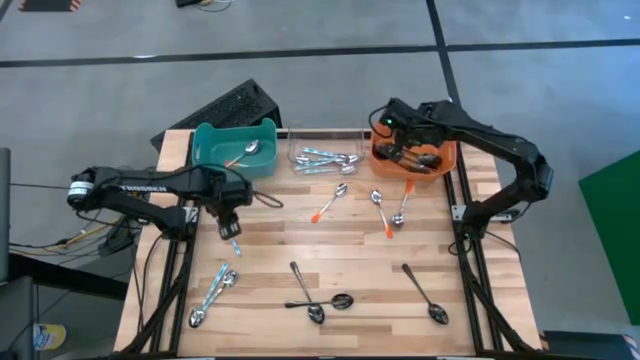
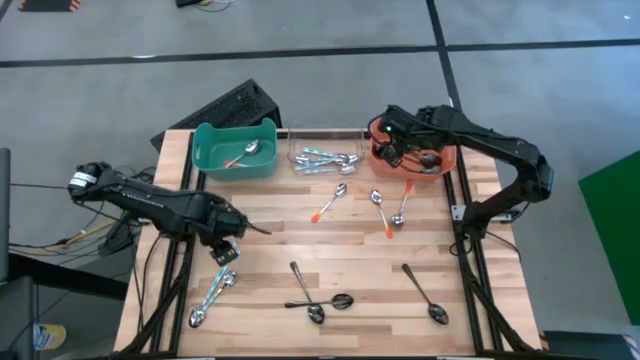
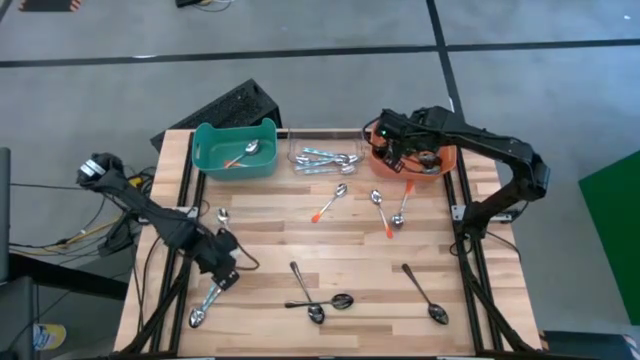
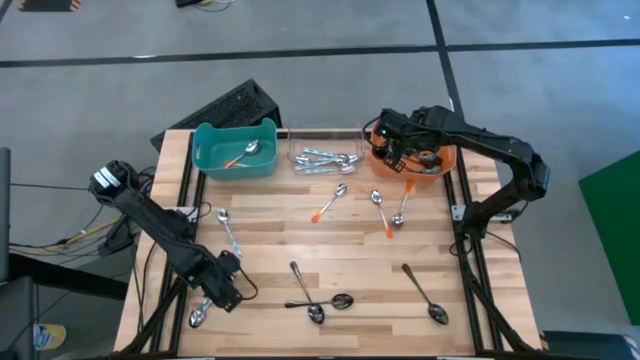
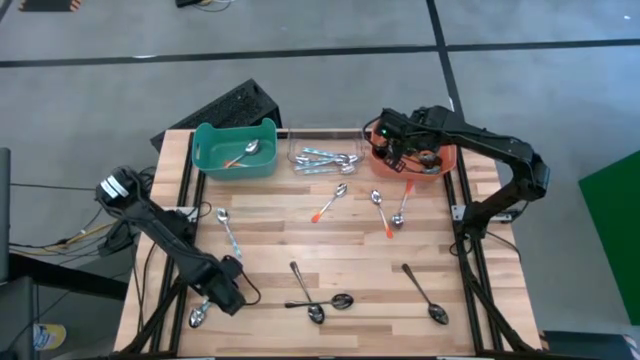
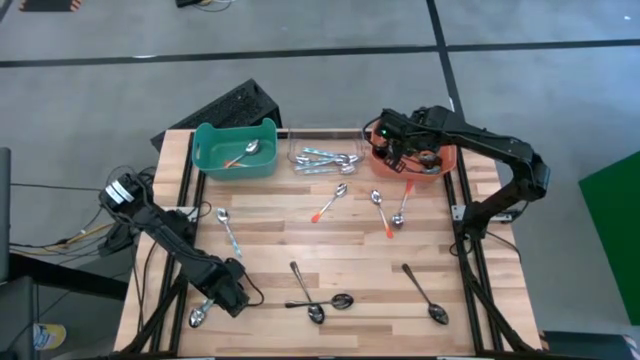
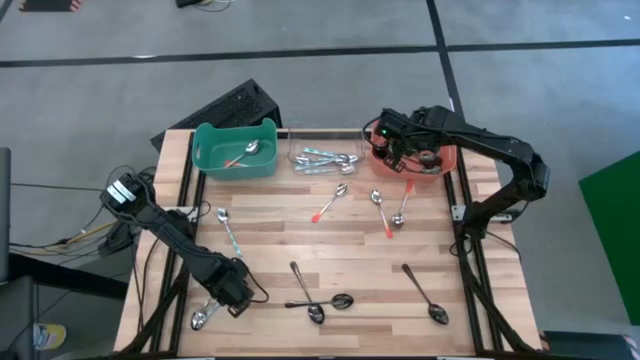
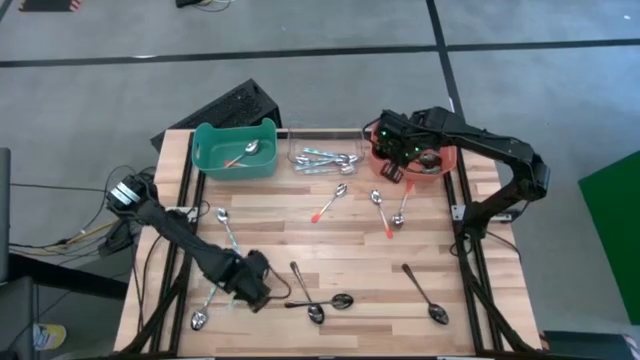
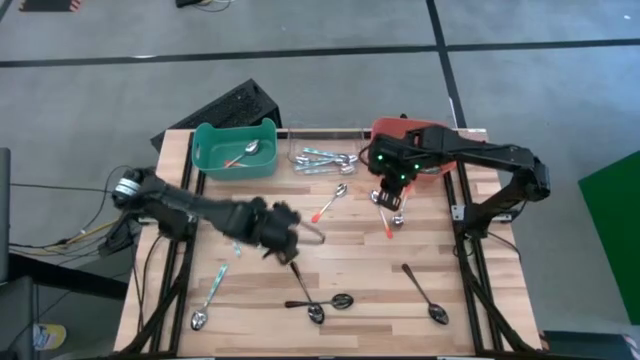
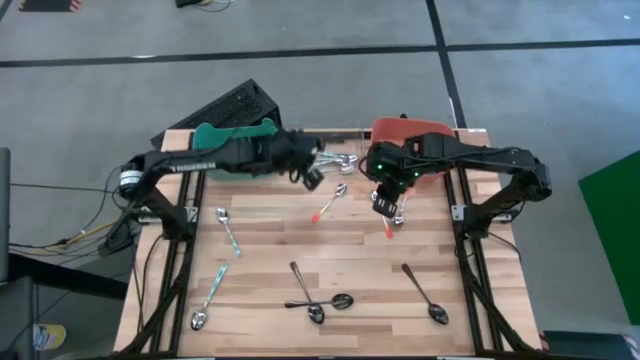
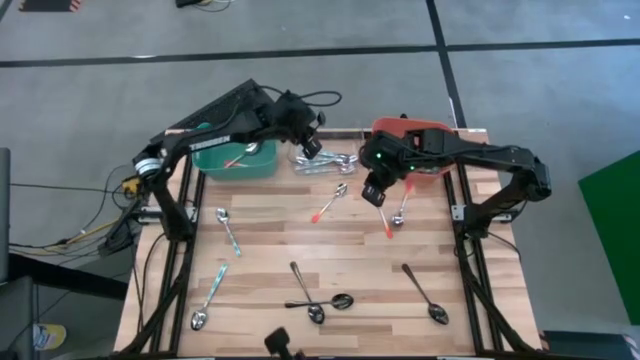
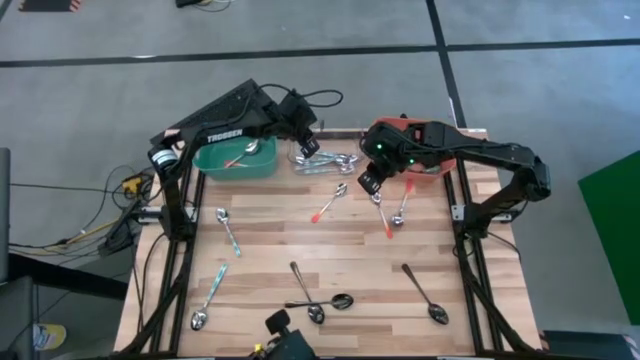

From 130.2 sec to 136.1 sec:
Task: Sort silverware by color (type)
Put the blue spoon into the transparent bin

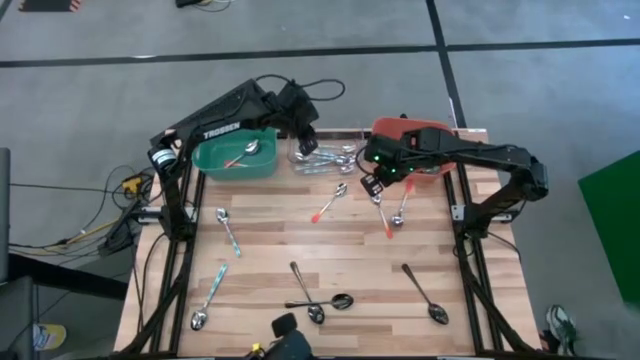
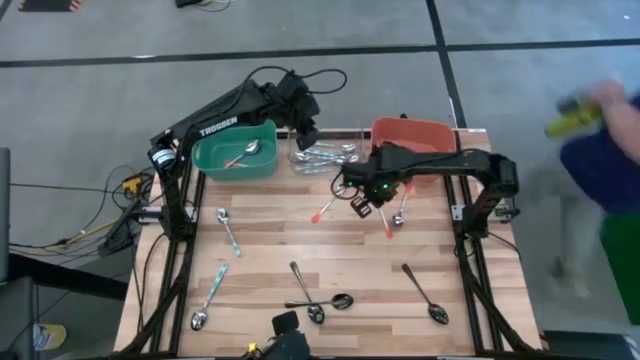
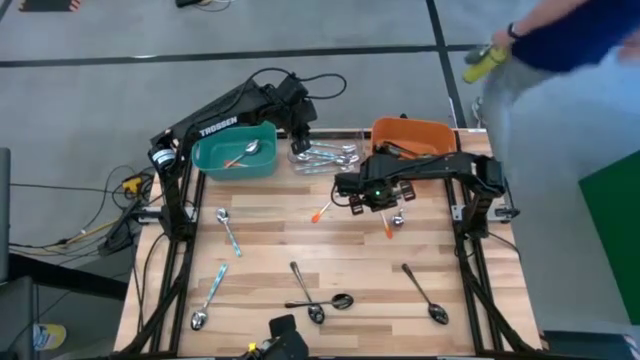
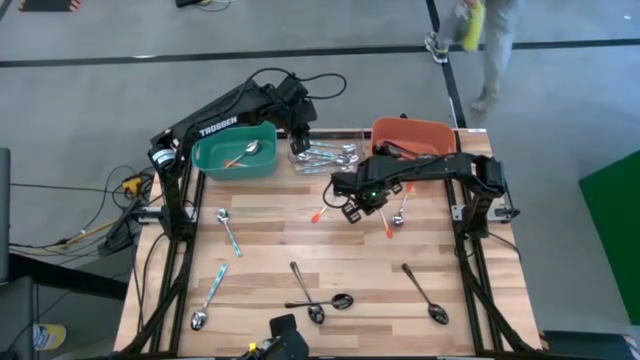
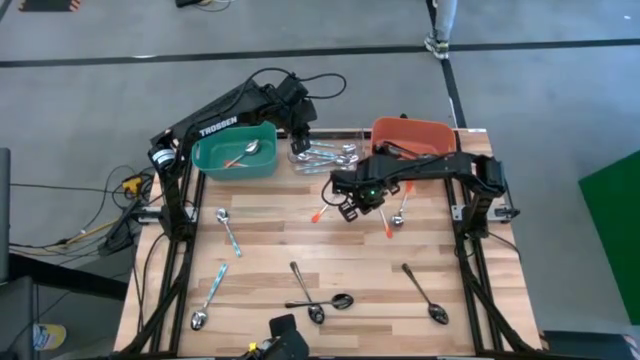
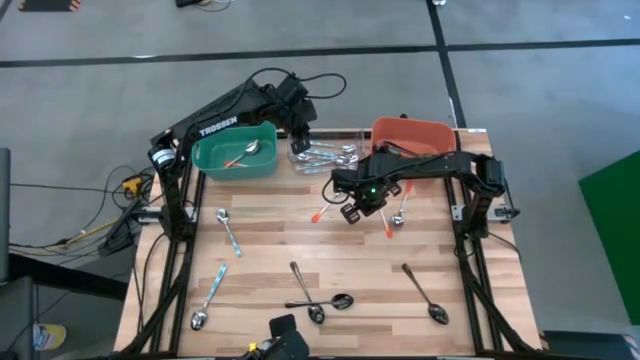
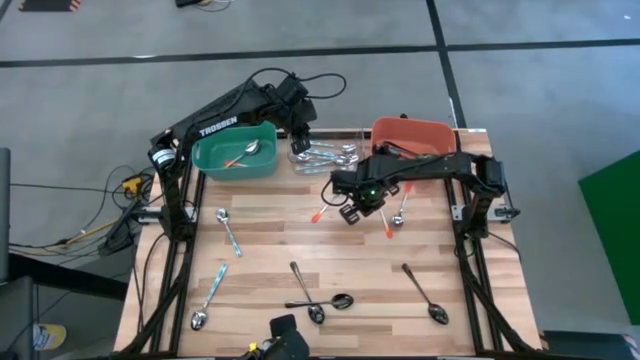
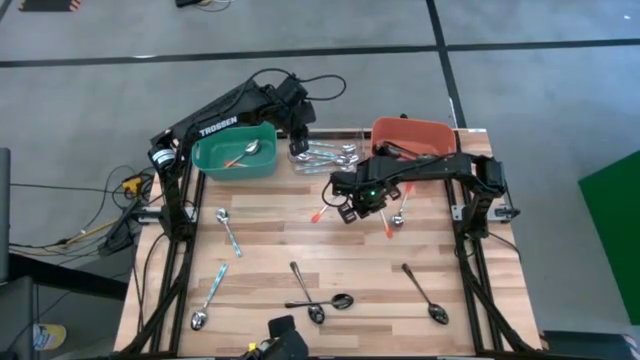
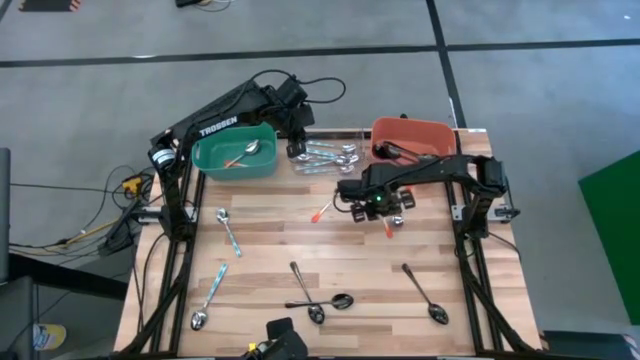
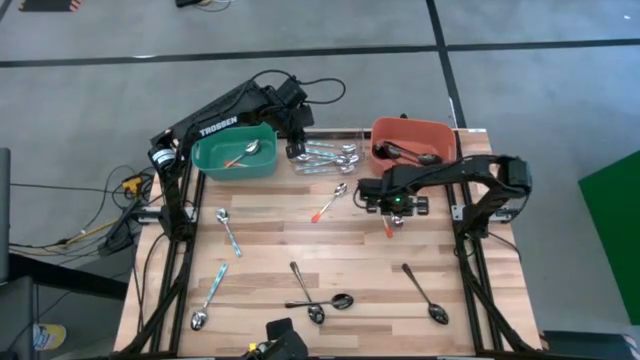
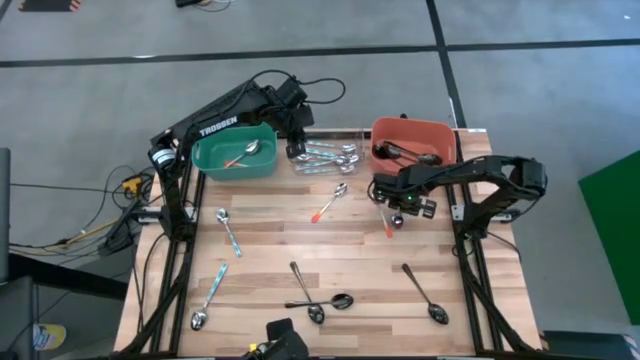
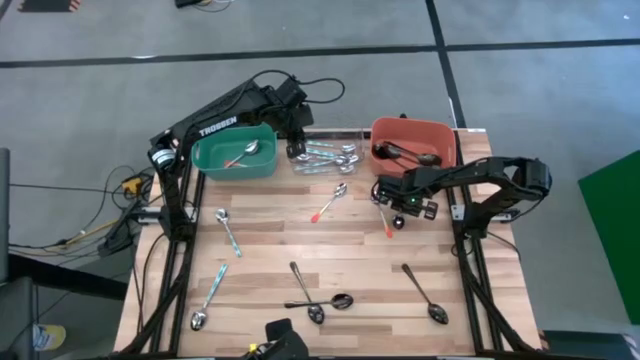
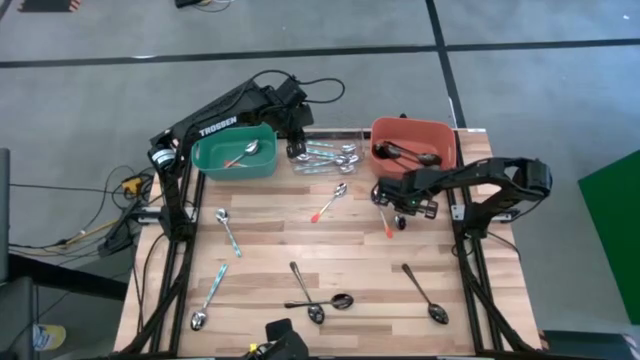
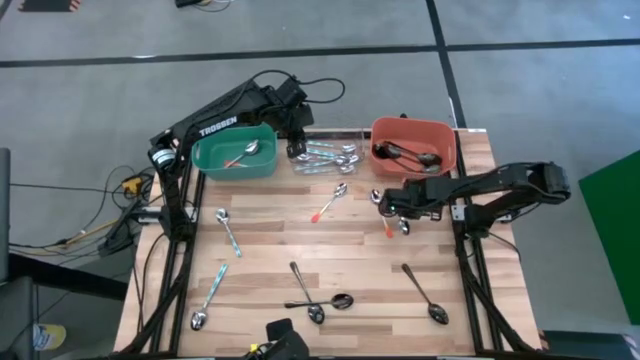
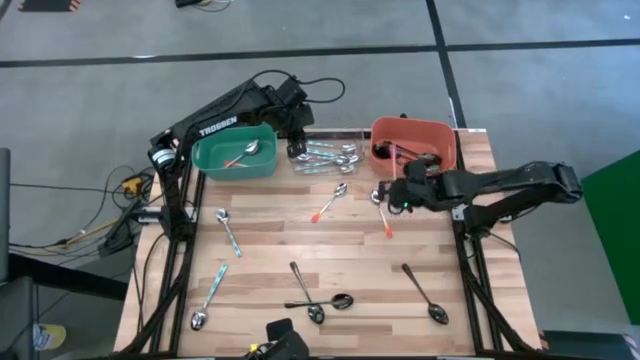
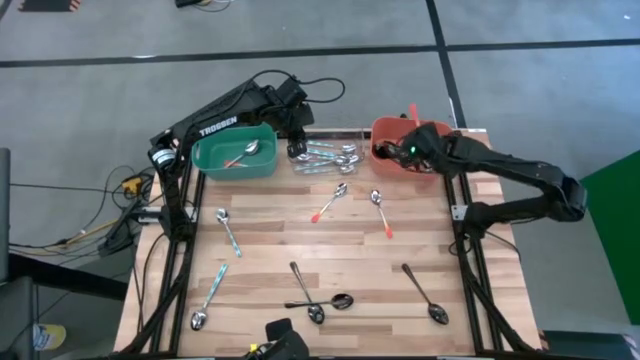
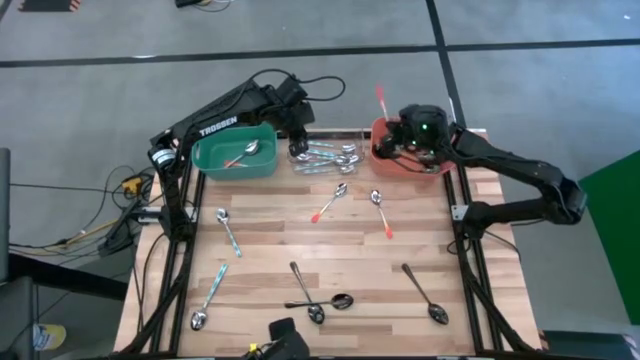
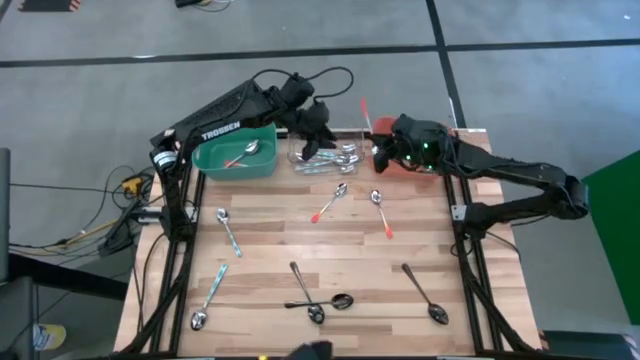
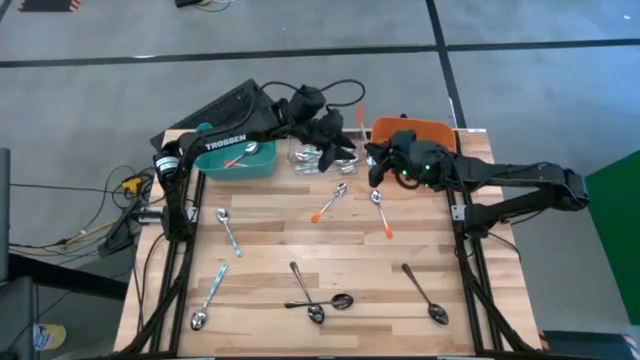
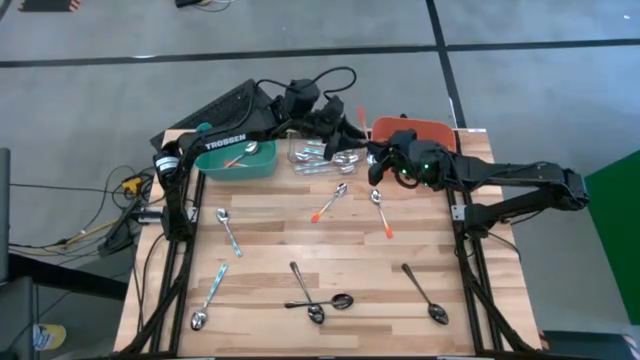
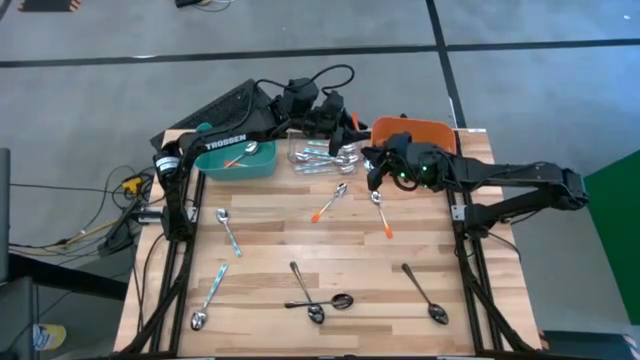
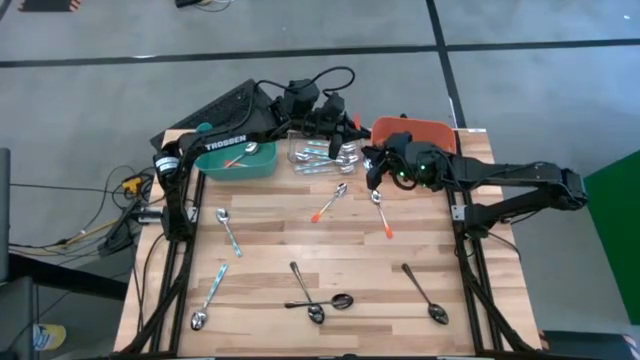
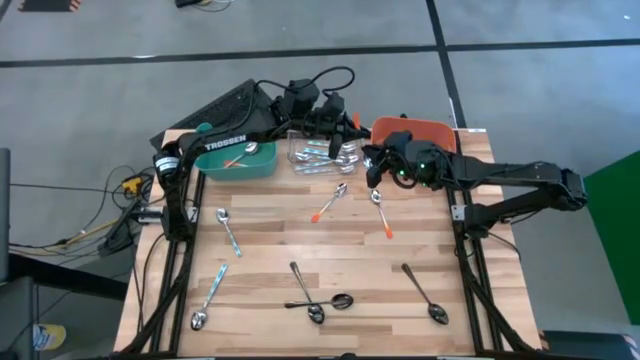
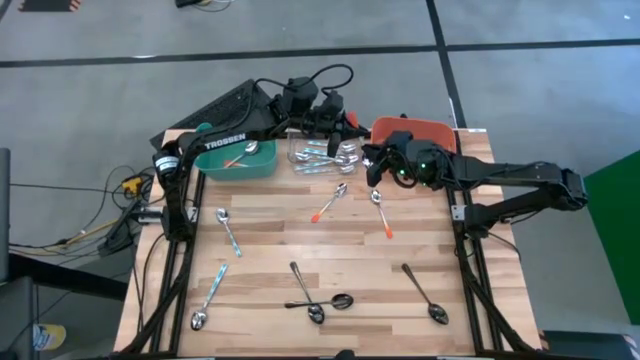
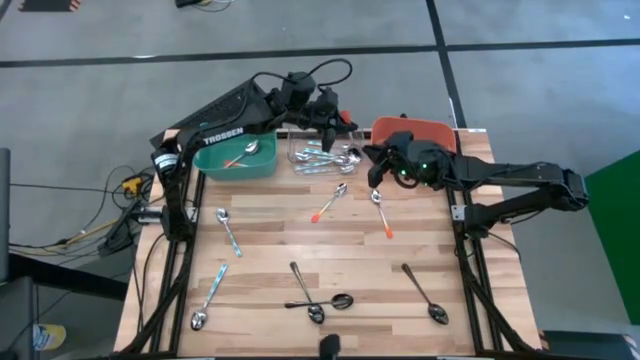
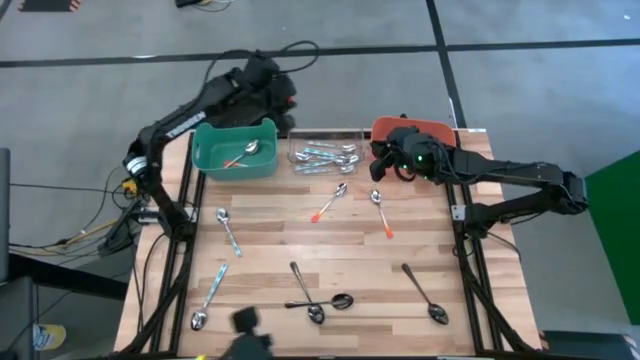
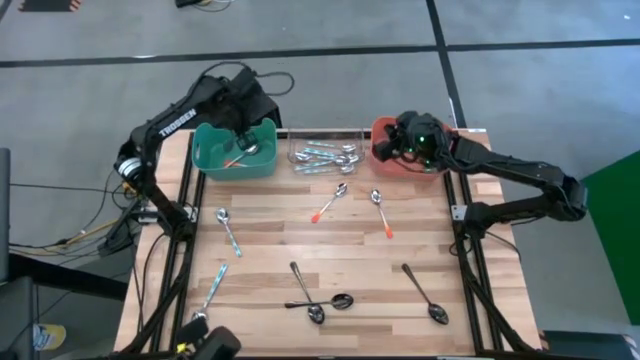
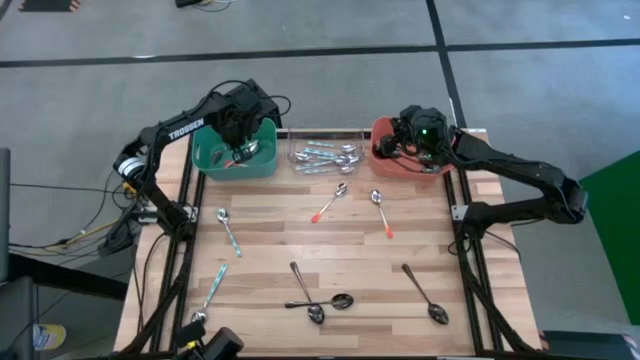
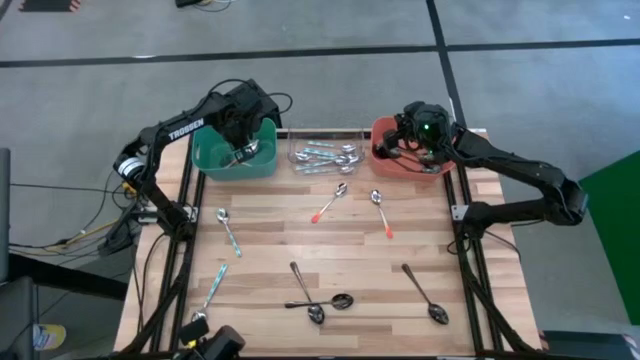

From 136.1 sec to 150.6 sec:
Put the orange spoon into the green bin

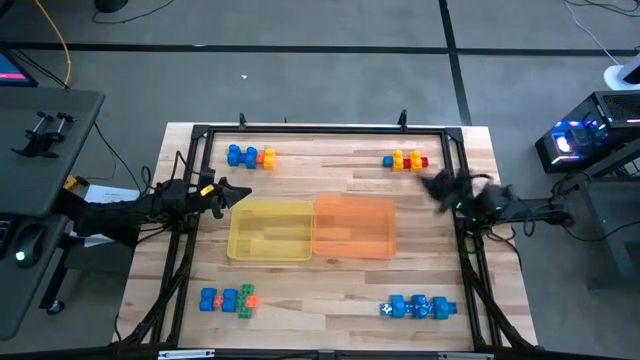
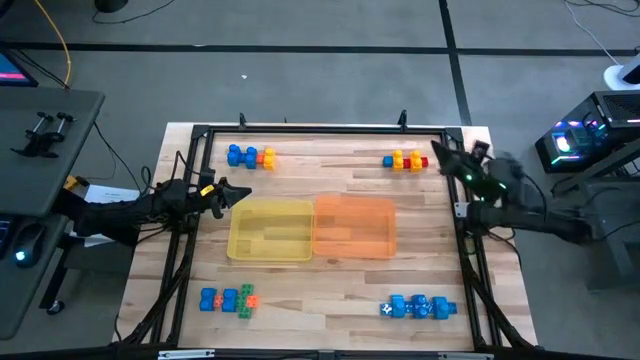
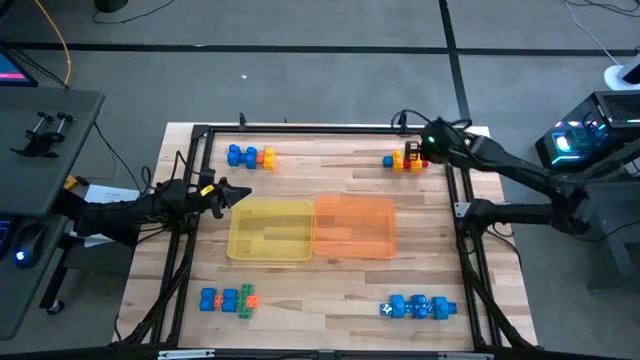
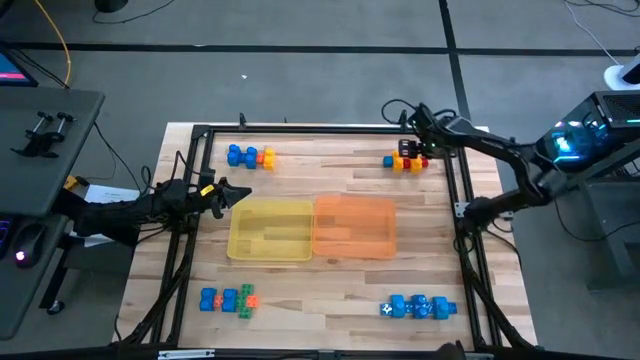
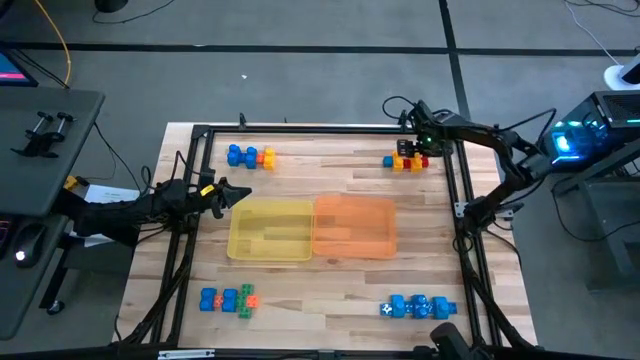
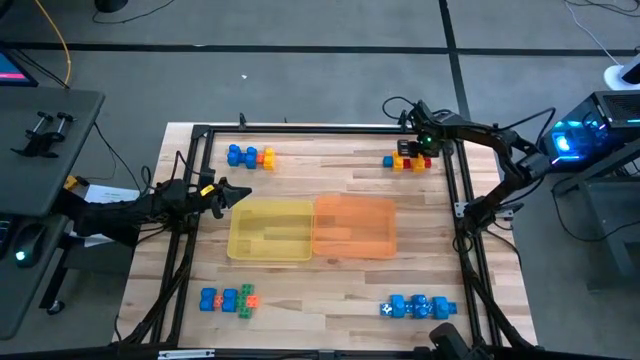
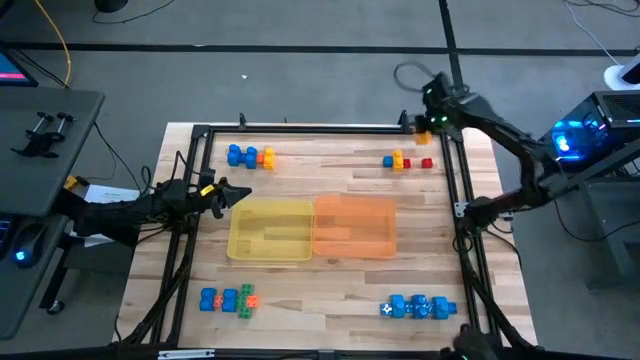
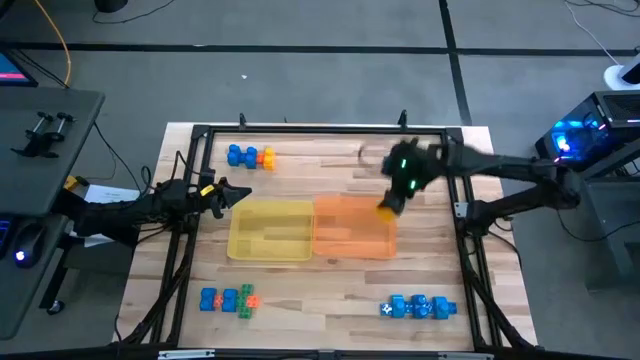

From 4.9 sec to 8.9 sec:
Task: Sort blocks by size
Put the large yellow game piece into the orange bin
